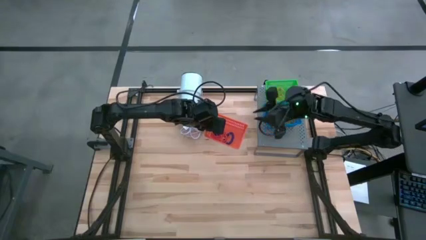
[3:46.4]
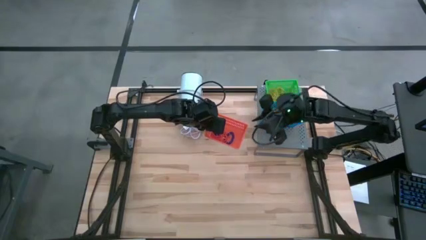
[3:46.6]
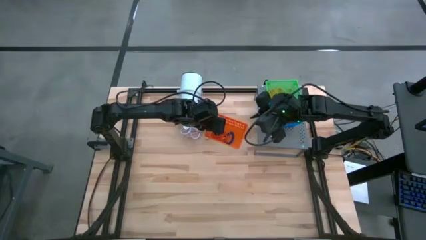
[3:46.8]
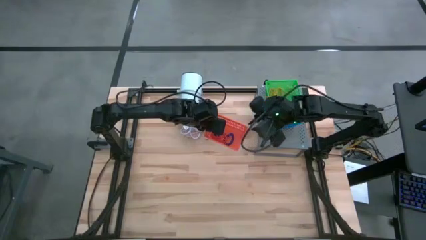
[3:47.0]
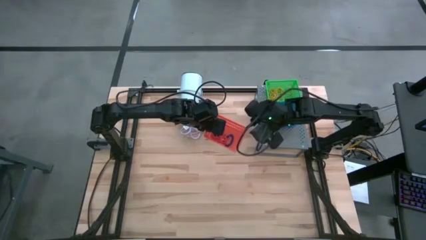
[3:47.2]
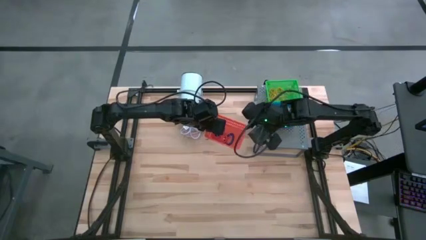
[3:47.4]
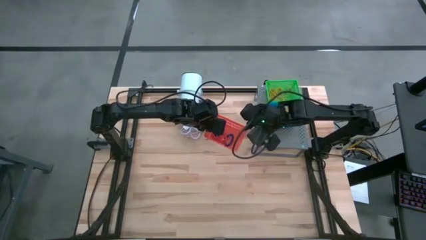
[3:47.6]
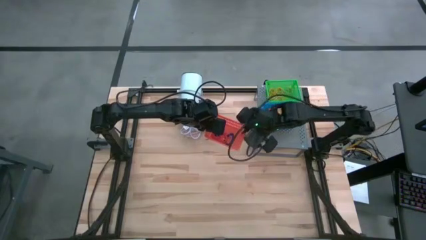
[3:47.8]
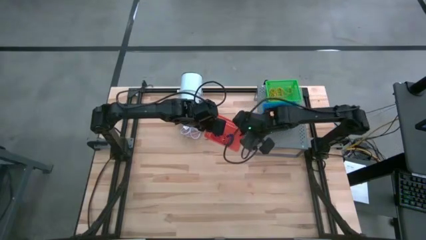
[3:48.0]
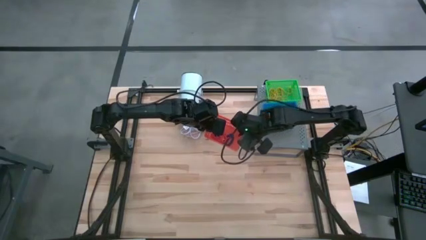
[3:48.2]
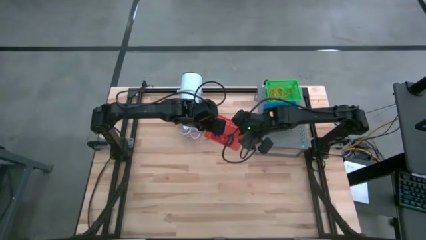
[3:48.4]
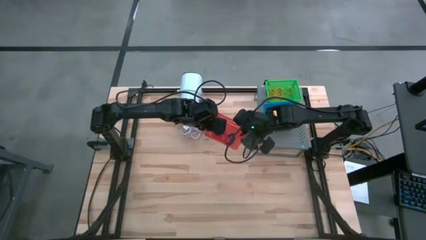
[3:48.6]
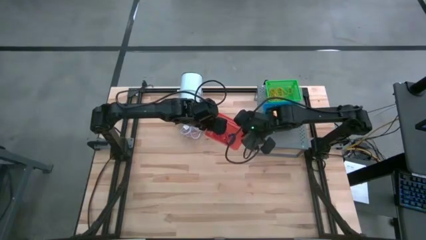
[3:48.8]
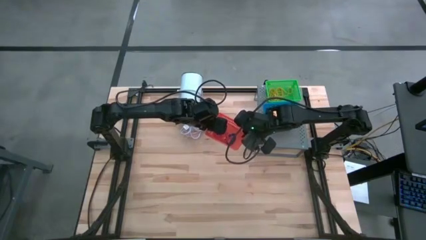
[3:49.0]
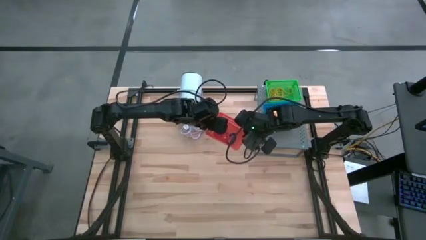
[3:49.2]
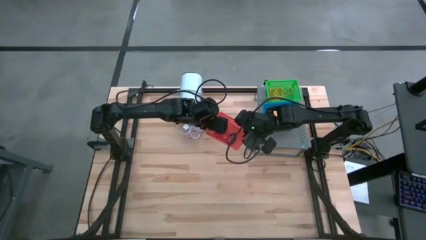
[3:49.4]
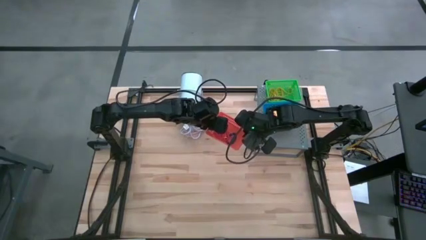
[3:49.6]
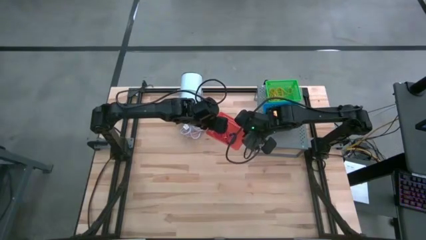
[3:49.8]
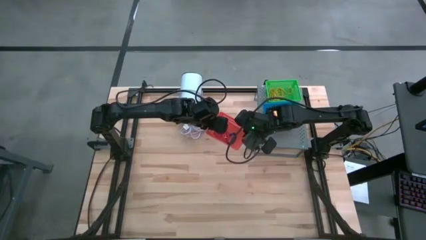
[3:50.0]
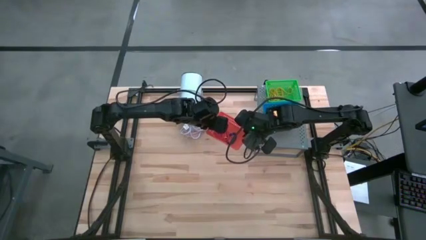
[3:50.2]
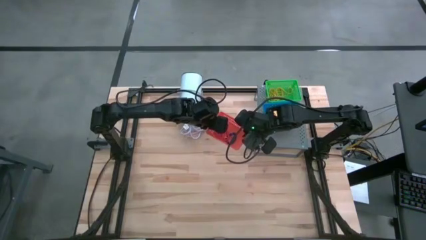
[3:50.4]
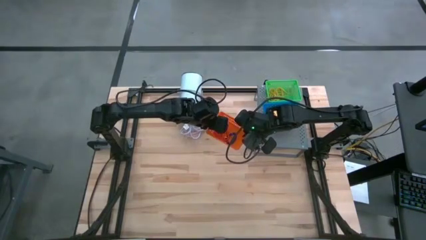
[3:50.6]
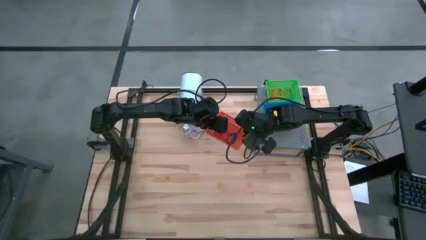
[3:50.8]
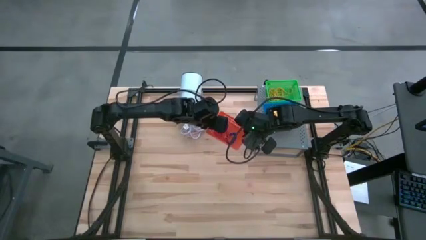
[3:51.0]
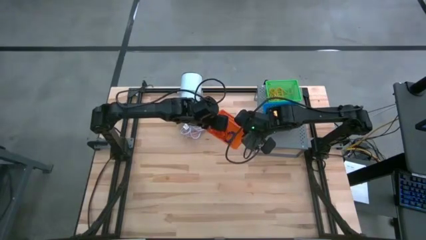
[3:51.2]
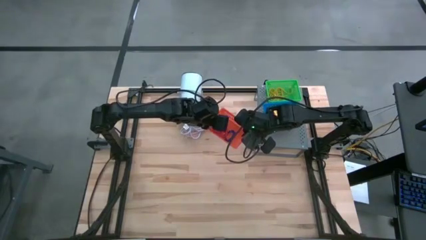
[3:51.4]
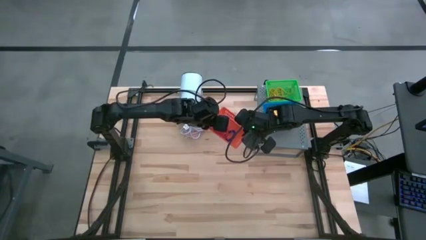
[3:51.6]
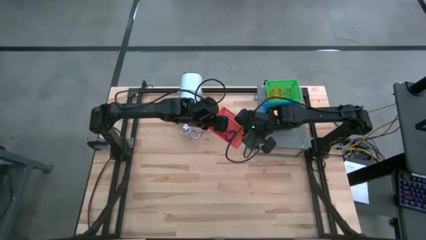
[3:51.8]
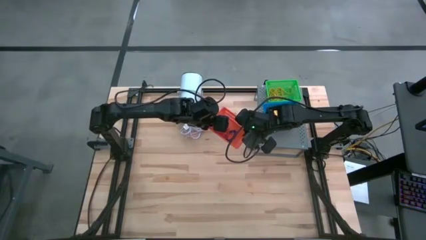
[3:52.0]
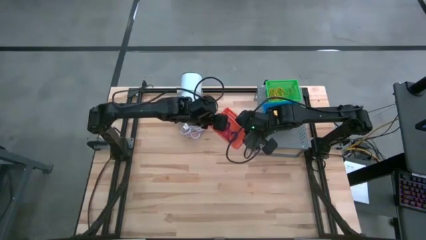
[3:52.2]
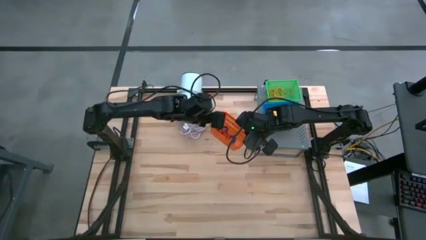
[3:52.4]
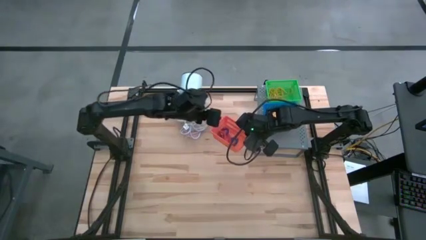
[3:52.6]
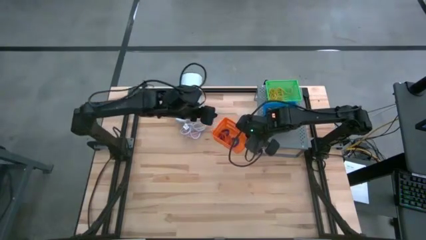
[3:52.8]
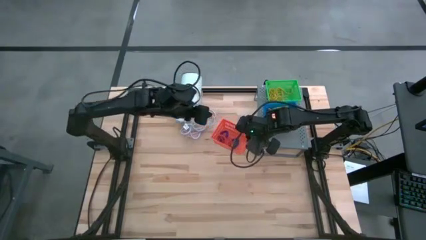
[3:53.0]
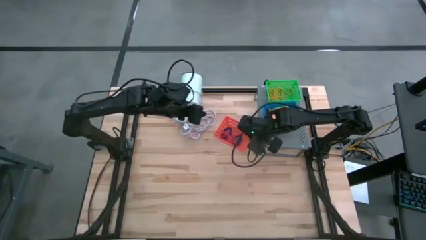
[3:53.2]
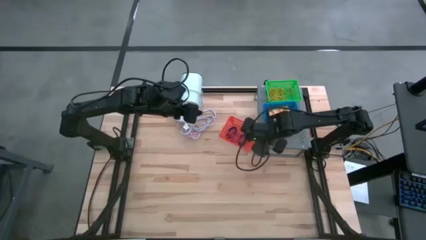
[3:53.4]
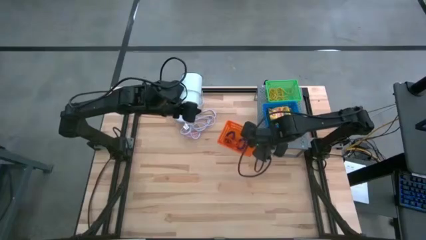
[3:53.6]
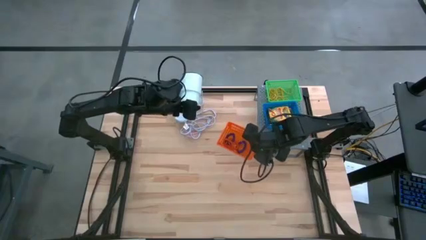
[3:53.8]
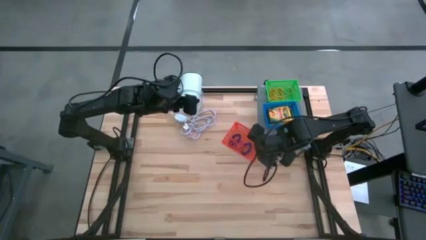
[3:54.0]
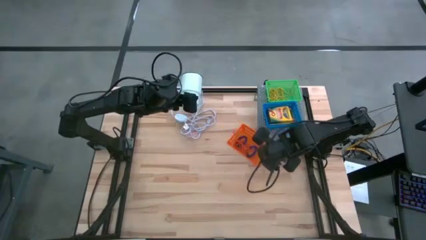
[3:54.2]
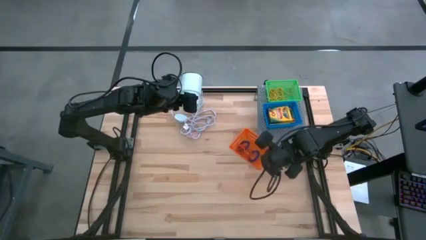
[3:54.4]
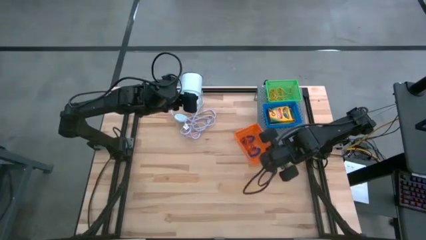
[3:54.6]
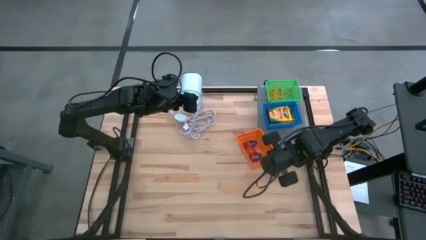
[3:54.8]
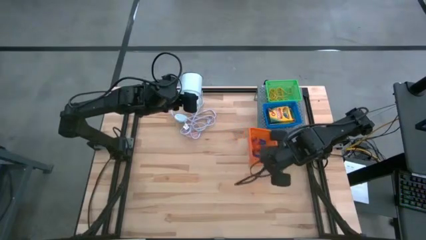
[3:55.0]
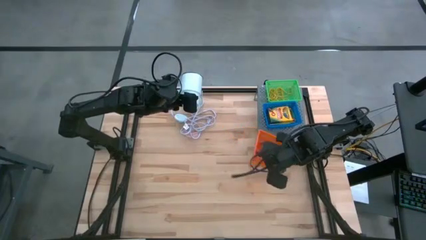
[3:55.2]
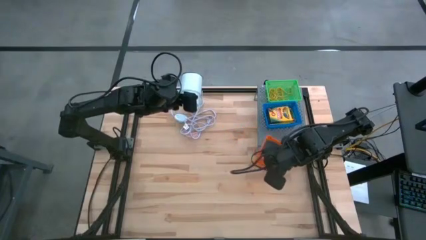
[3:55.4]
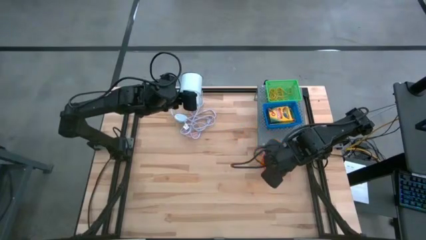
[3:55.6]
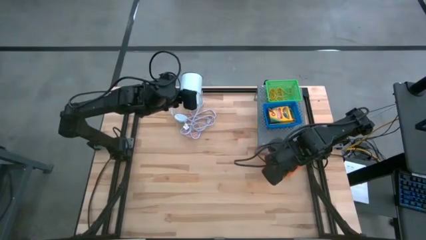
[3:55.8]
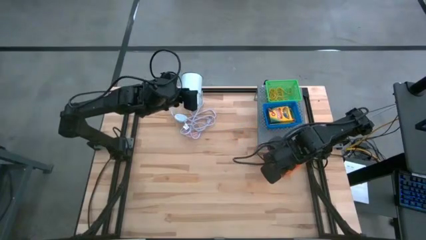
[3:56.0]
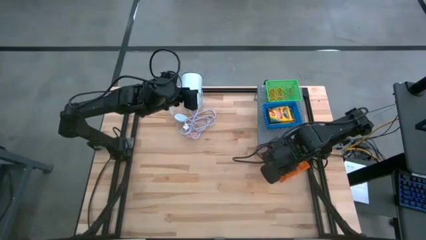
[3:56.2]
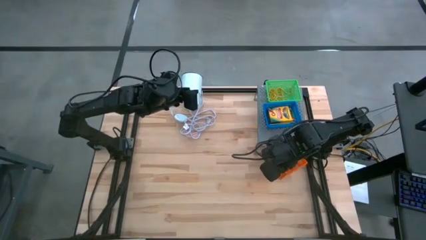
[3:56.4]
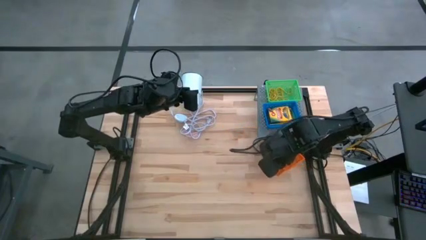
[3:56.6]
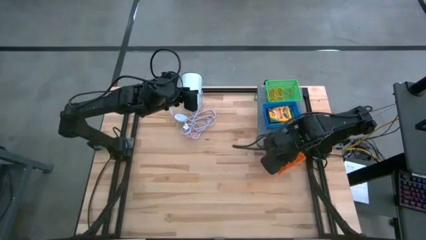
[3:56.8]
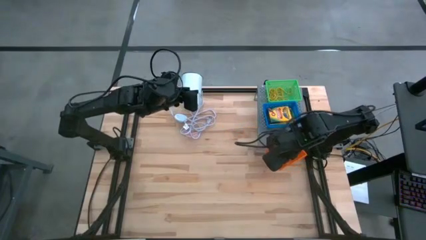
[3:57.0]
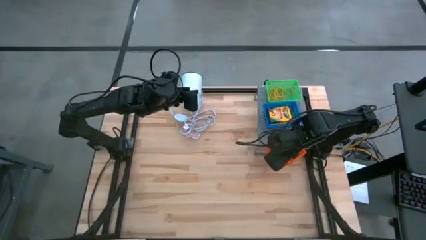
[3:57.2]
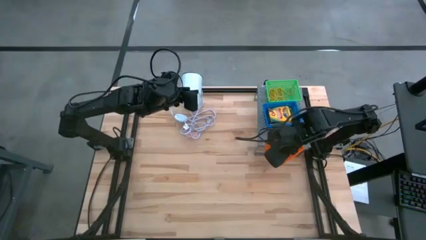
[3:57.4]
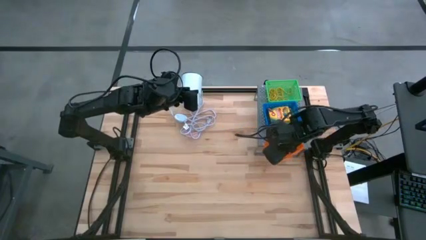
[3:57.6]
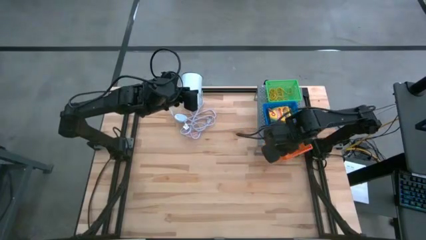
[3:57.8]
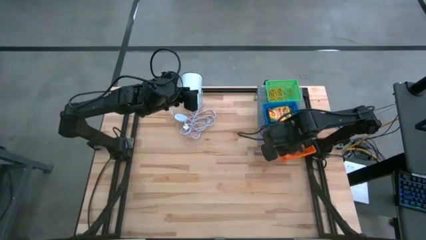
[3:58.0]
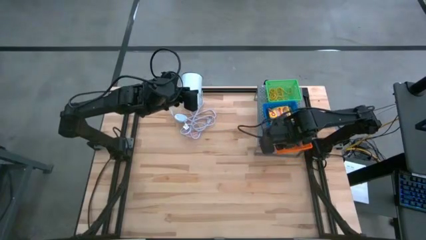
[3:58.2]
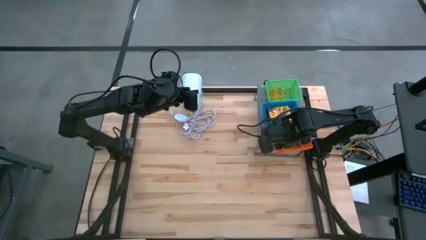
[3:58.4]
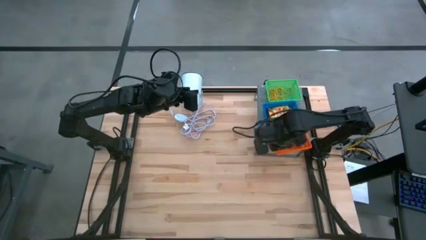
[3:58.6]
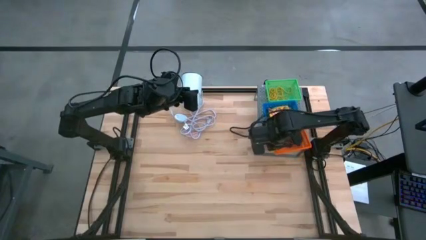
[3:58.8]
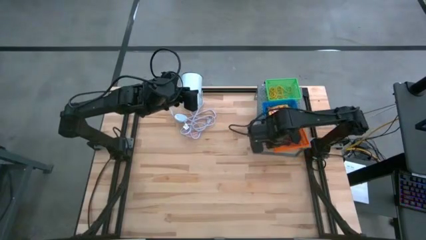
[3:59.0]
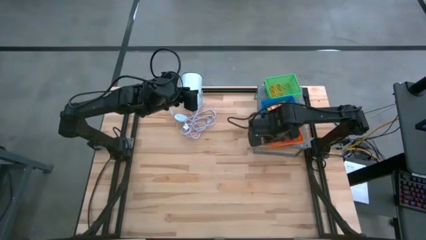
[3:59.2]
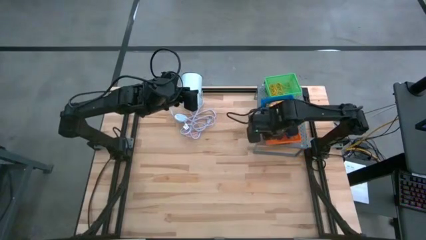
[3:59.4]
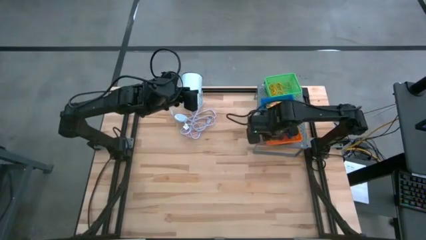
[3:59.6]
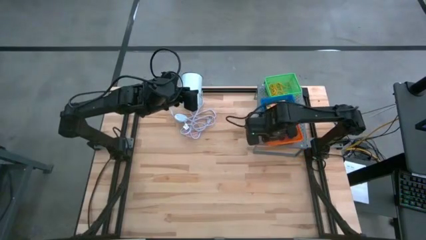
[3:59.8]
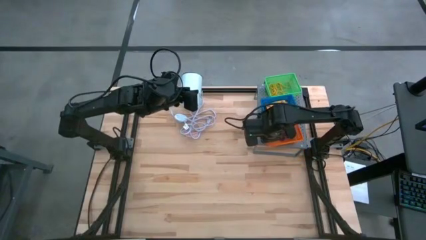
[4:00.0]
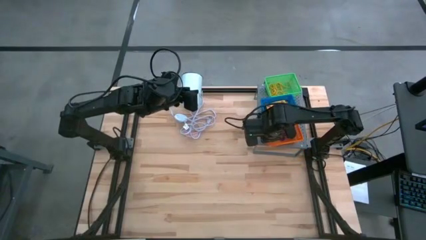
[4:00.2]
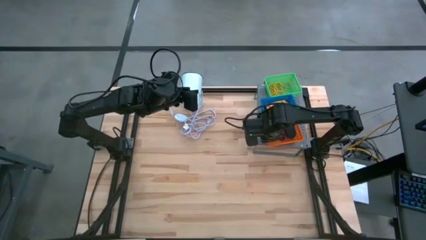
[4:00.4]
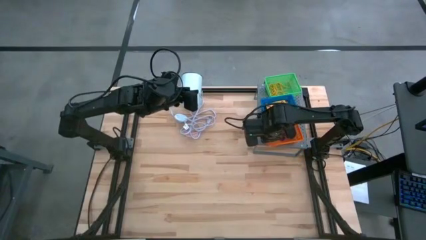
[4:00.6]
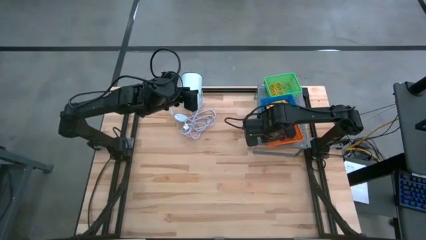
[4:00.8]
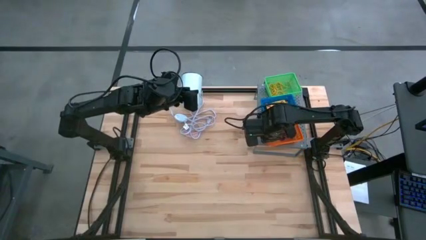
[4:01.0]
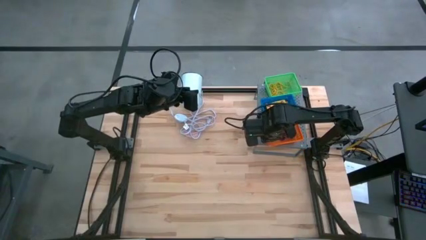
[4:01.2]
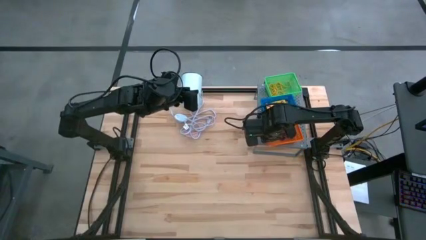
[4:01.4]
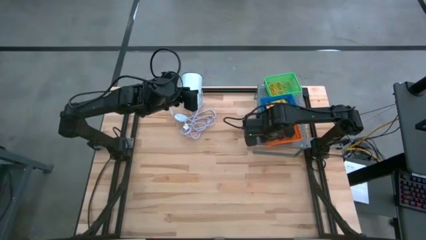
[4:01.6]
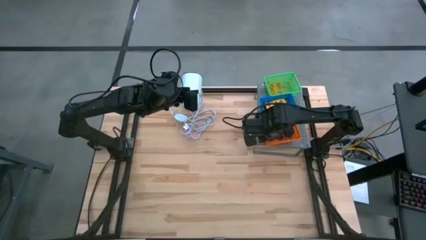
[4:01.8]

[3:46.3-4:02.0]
Task: Pick & Place Office Desk Supplies
Put the orange bin filled with spring keychains on the shelf
